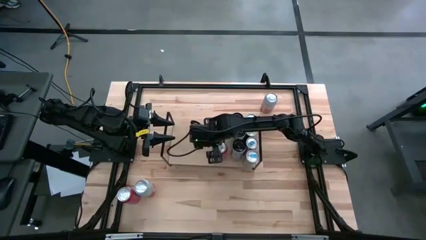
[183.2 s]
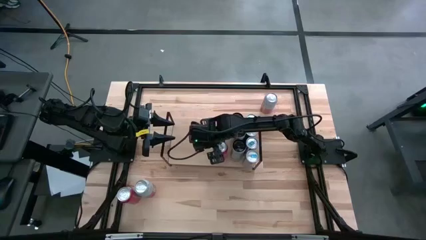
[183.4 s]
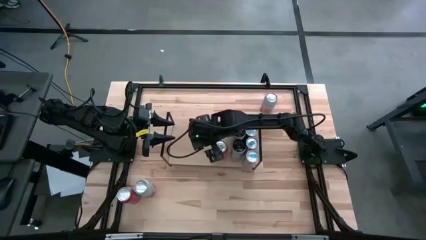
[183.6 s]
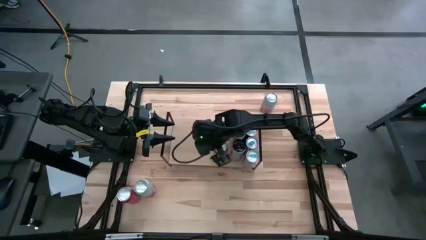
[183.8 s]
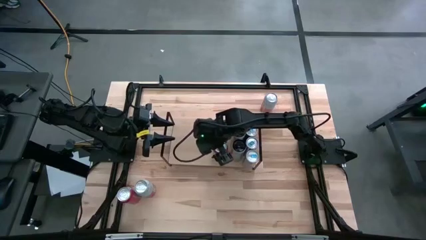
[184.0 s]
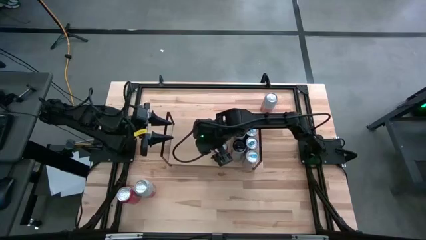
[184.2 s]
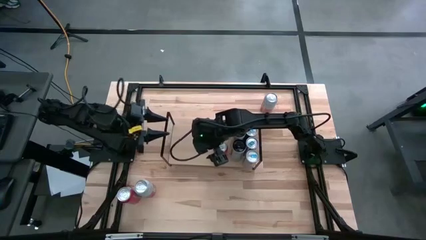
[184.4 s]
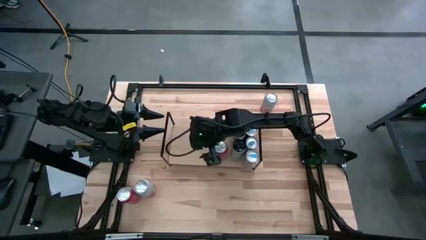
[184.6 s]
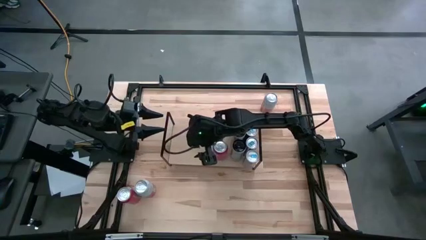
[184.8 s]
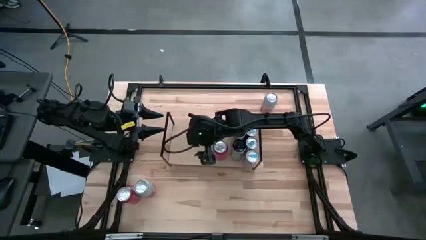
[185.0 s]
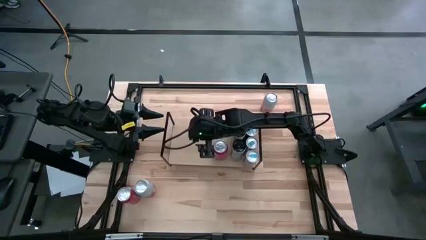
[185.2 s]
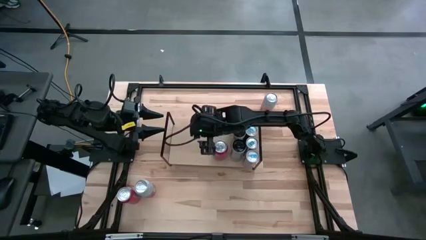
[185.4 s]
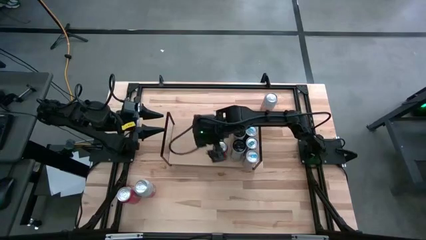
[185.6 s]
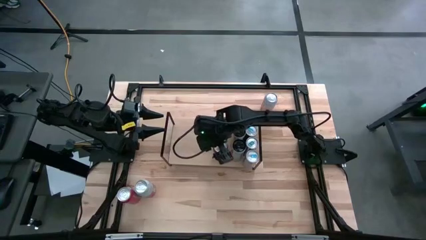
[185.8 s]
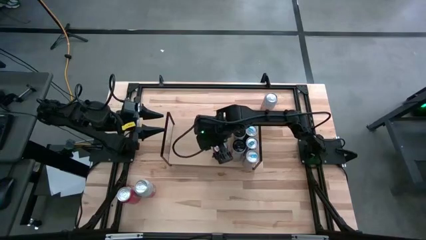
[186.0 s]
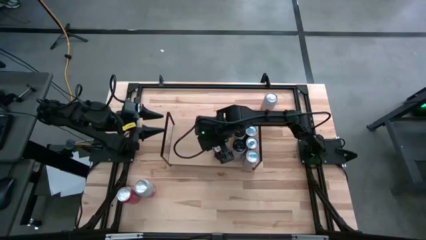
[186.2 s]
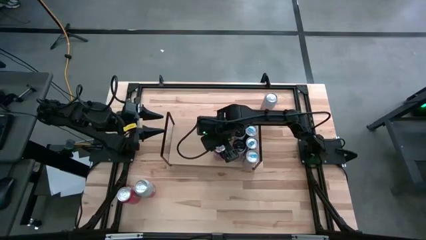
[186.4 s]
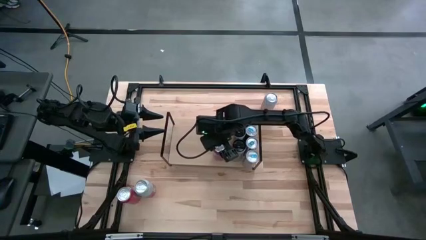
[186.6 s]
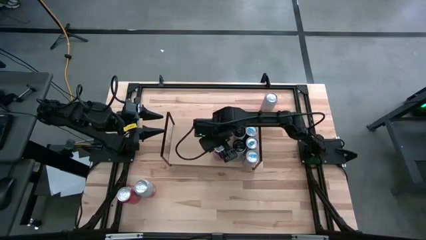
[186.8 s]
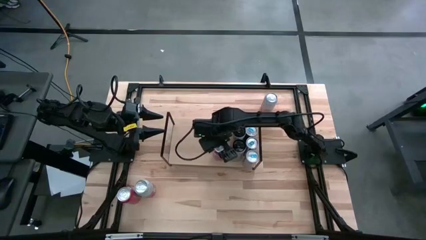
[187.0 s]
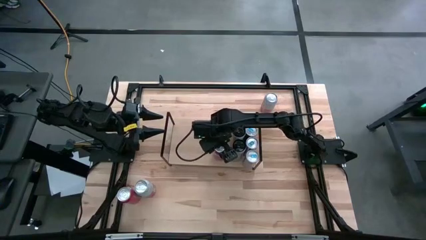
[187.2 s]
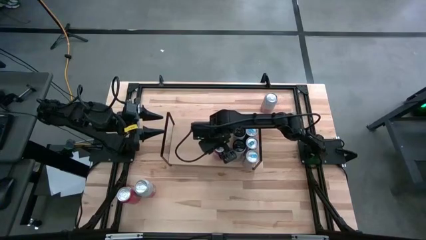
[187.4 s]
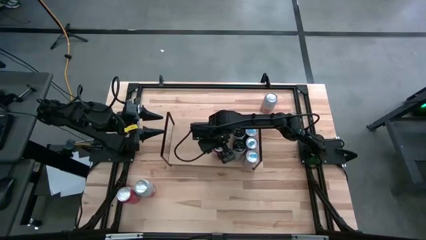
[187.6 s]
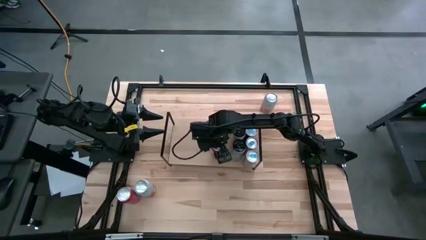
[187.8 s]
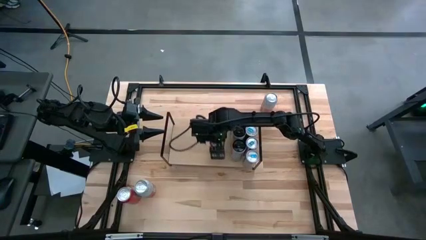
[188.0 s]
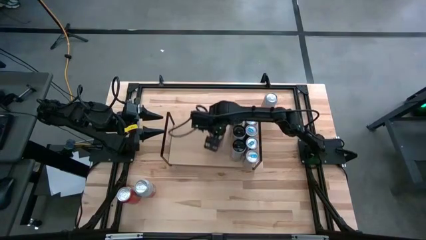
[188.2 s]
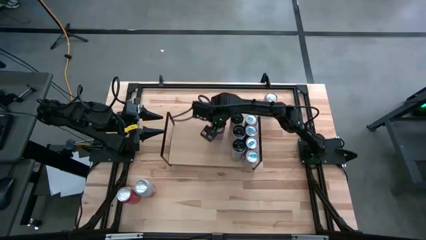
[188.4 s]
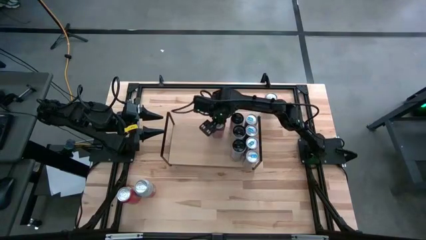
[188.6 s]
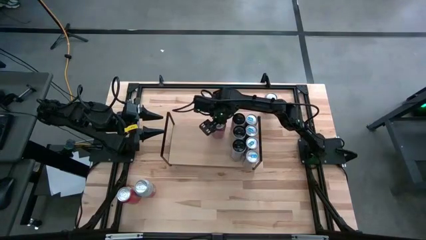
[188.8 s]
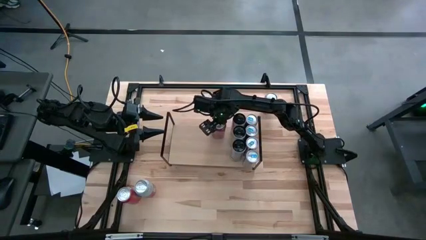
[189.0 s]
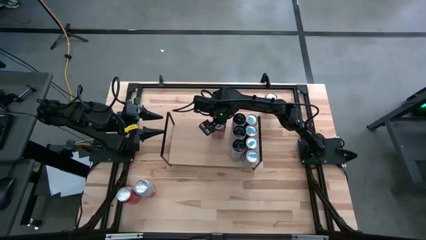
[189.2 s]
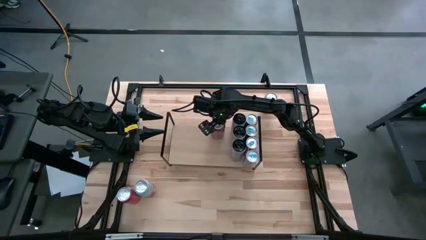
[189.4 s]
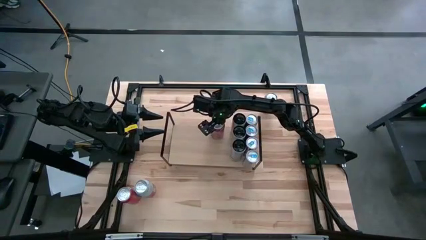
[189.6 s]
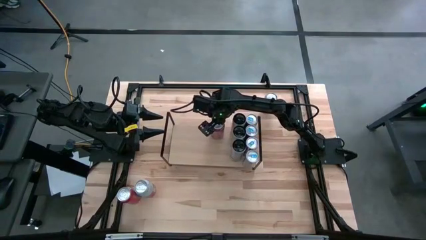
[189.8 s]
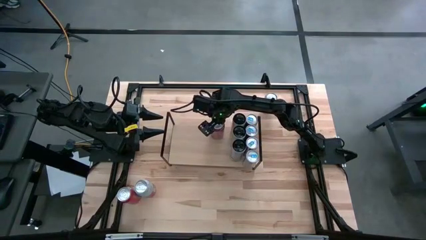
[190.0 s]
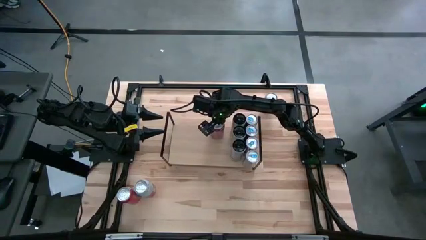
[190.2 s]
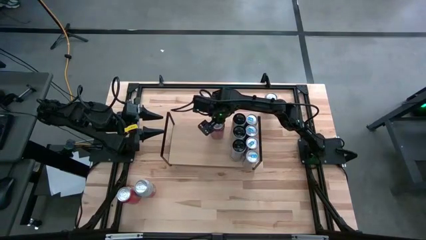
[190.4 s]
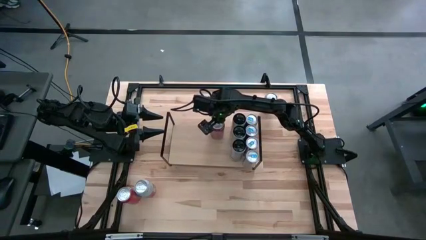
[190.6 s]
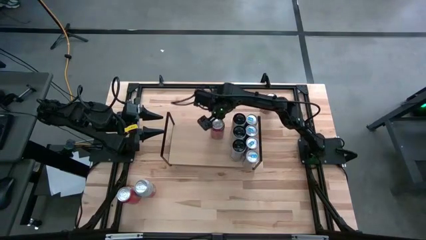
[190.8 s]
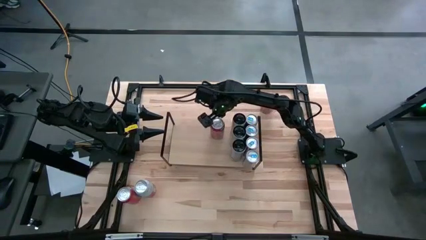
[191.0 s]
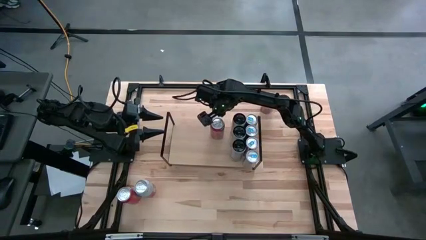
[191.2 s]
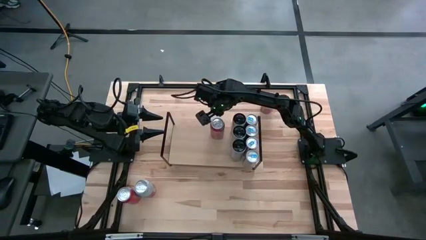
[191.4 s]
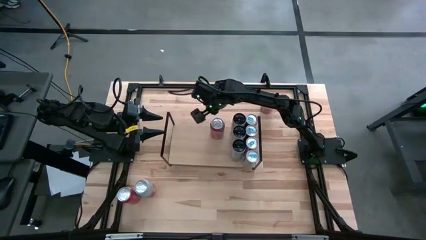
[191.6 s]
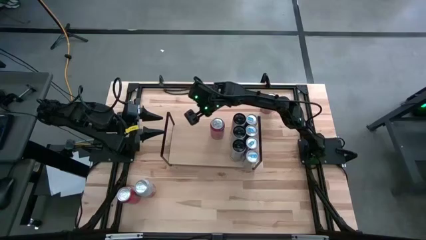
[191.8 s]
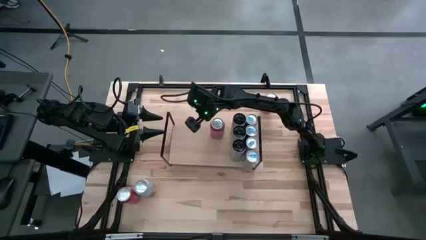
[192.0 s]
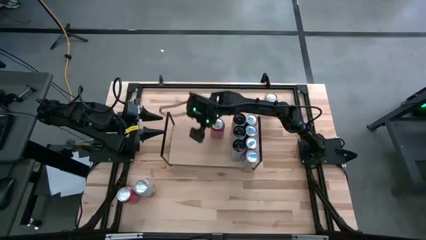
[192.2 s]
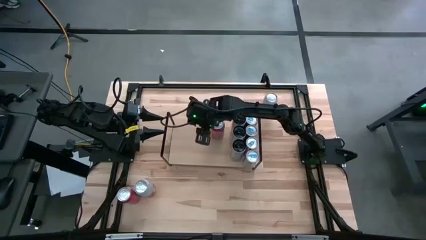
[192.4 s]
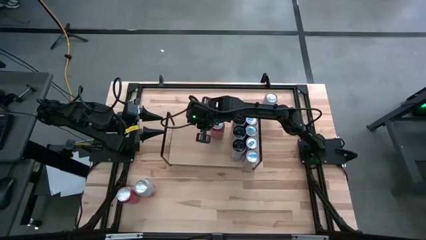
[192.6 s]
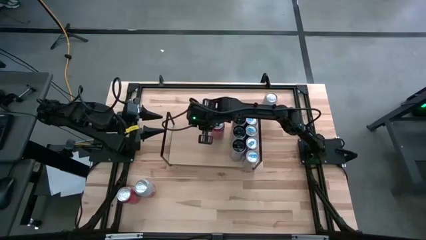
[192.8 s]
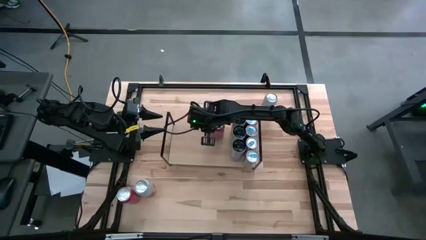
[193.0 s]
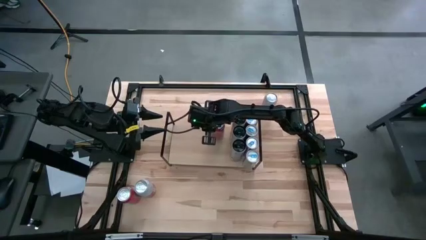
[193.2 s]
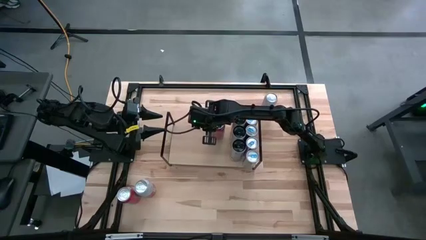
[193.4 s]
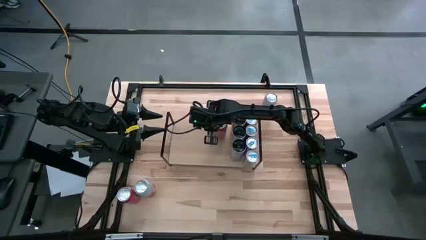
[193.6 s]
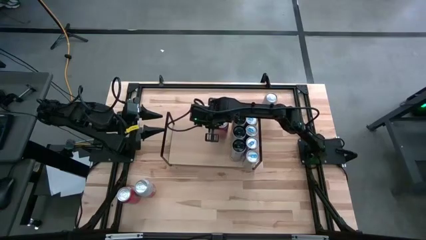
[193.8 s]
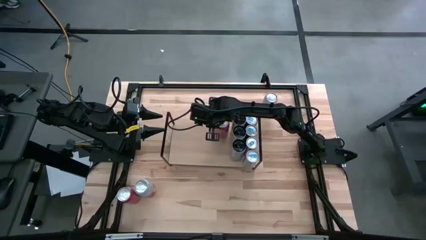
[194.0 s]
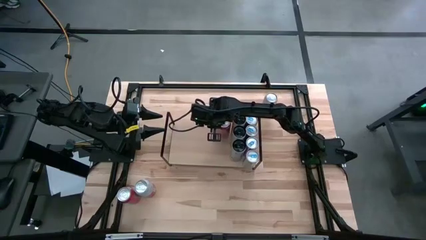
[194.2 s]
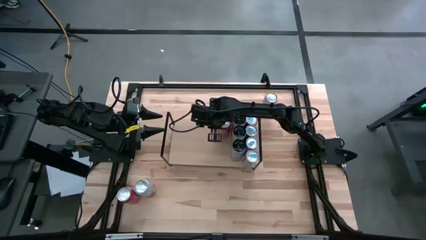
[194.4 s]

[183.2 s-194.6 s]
Task: Place canned beverage on shelf
Put the orange soda can on the shelf
